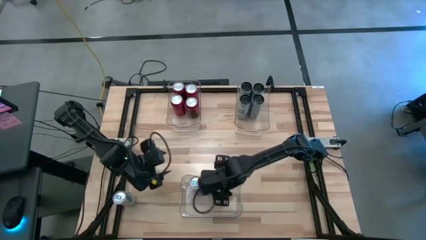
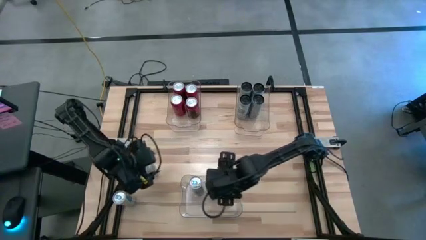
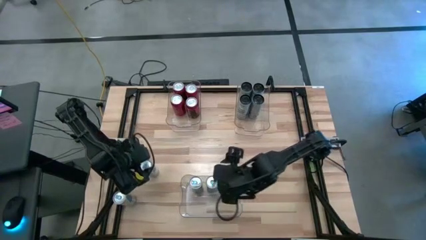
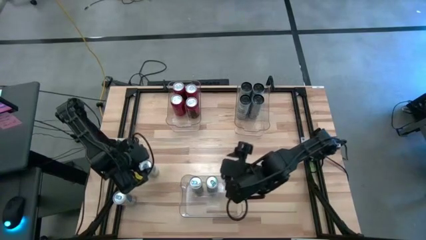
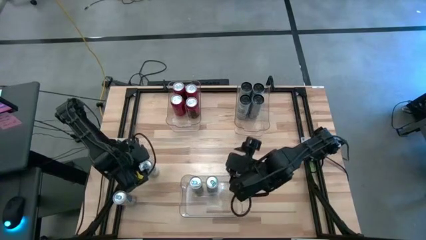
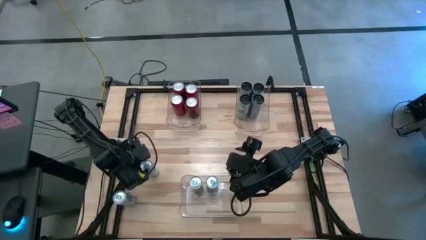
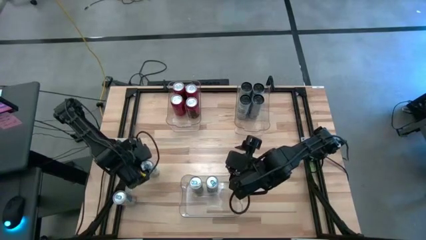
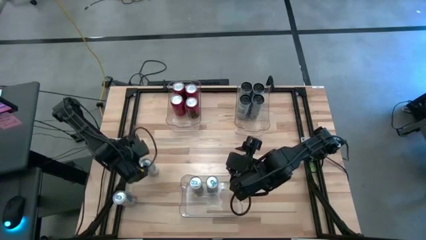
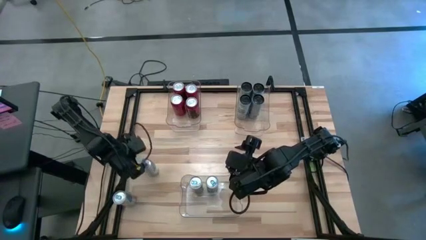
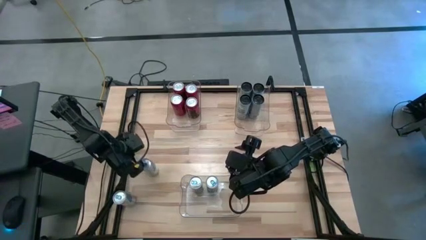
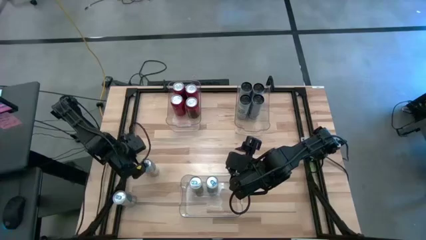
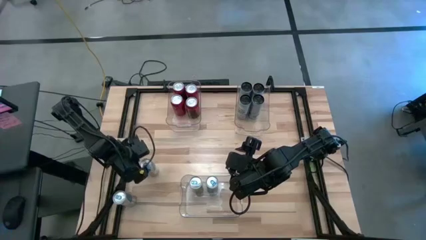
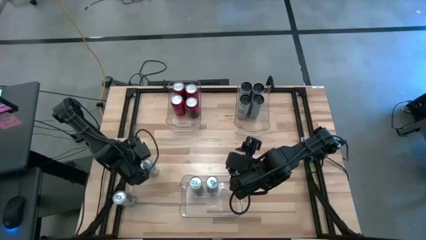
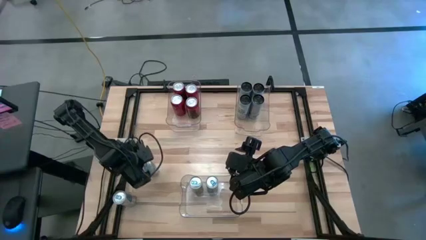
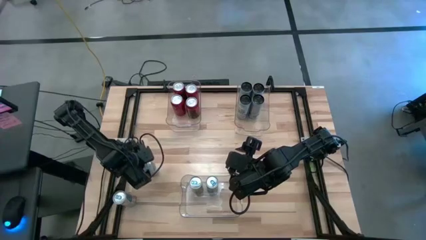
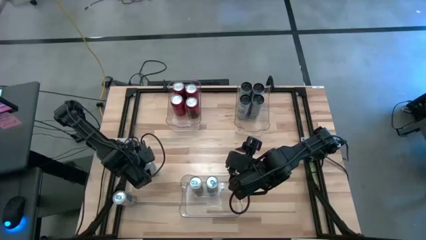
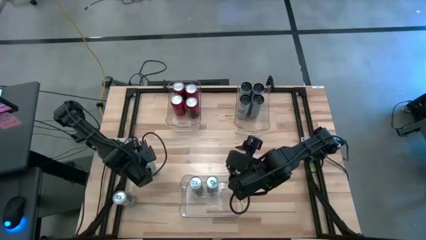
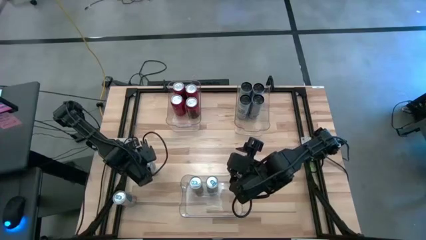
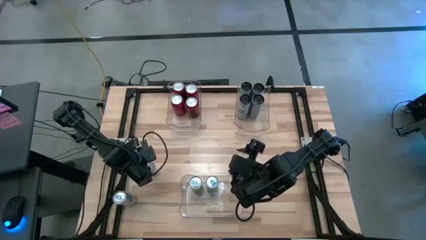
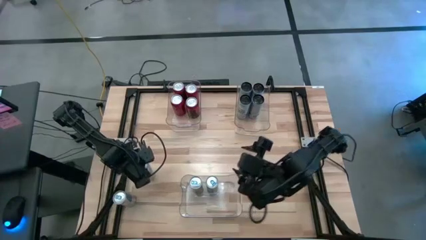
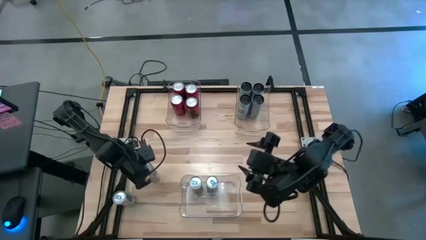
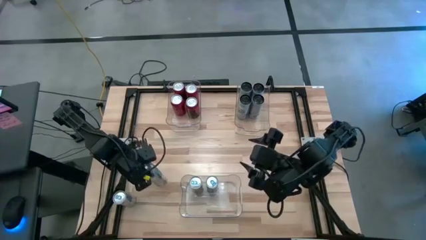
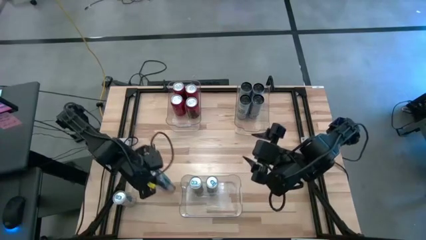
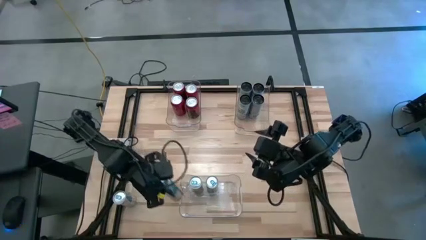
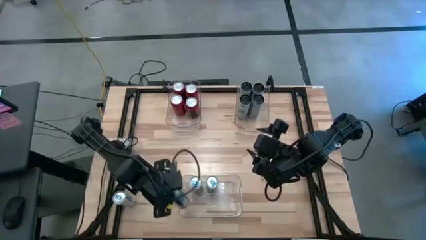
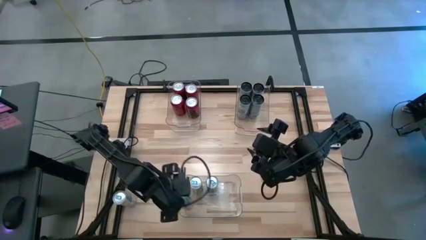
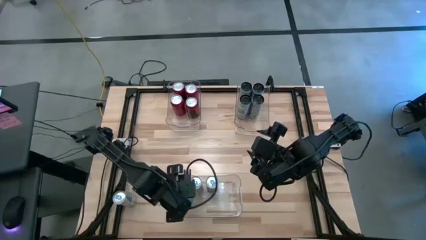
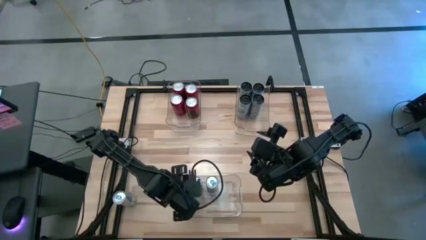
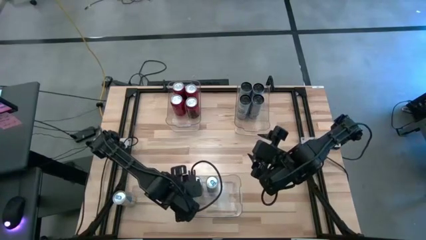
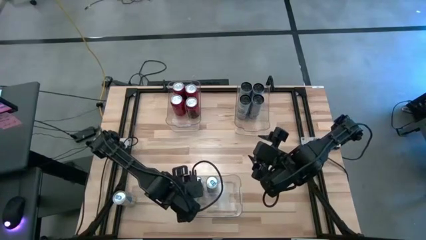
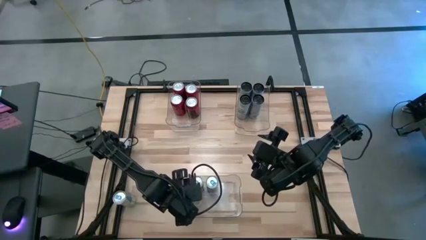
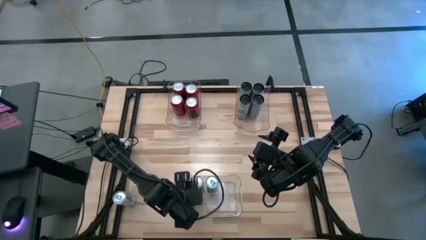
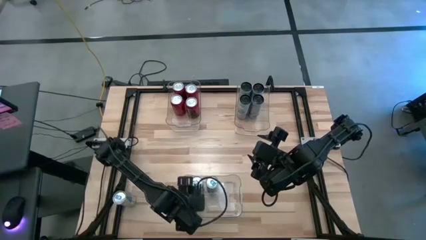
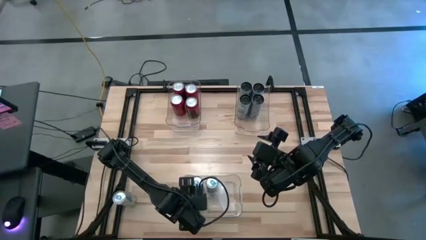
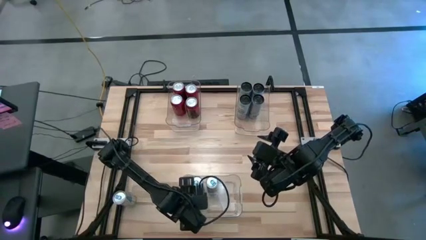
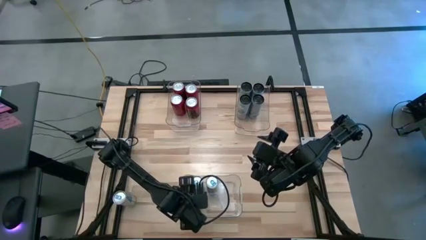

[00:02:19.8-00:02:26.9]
Task: Sort soda cans
Put the top blue soda can into the bottom transparent bin

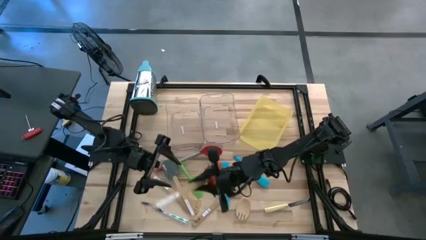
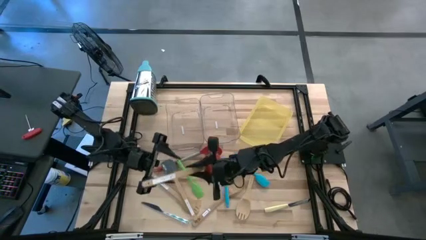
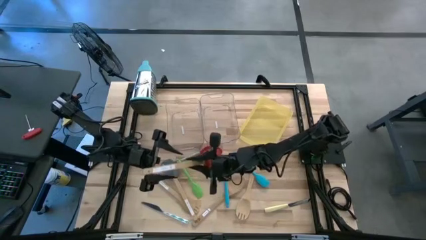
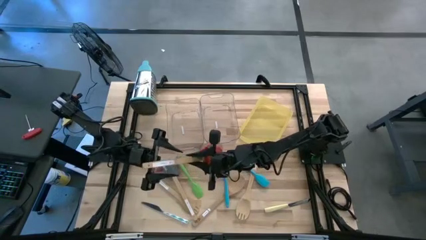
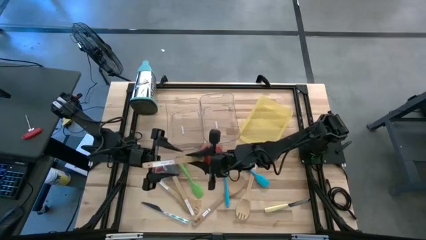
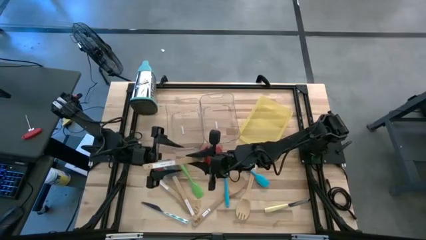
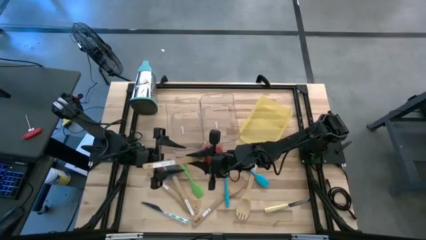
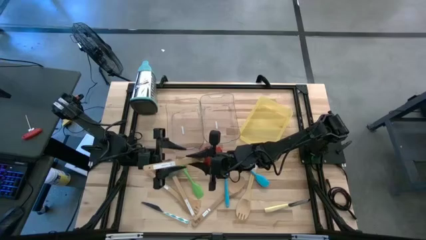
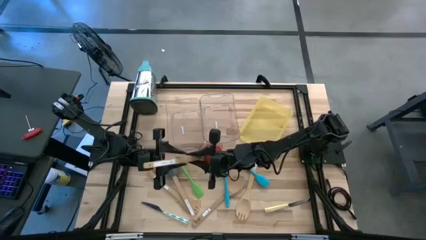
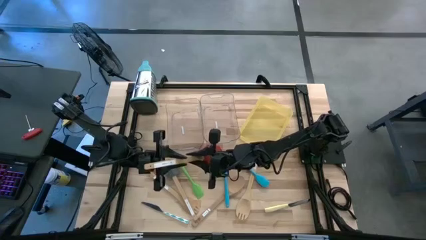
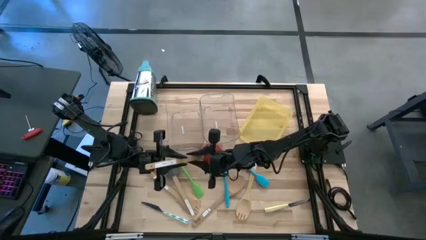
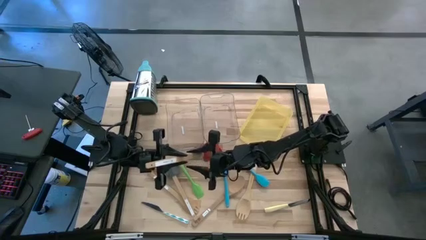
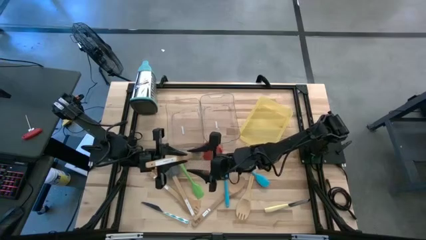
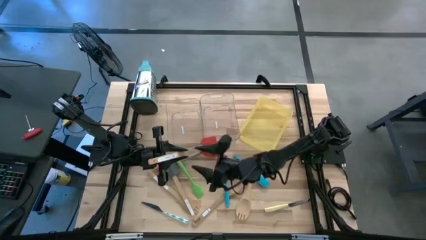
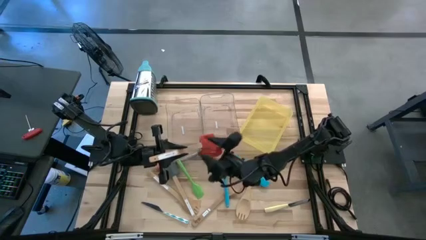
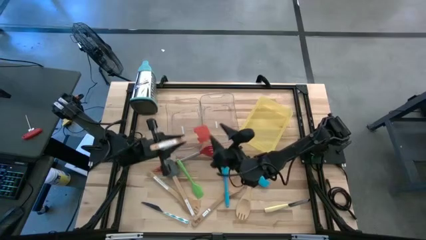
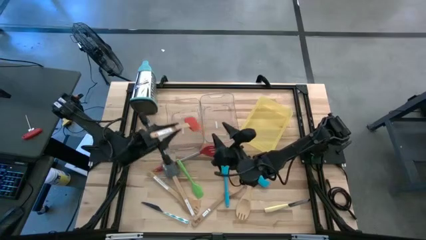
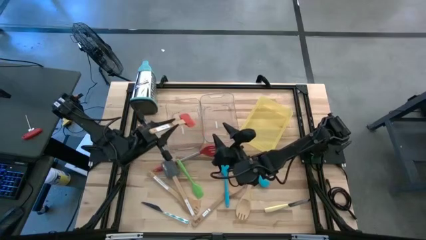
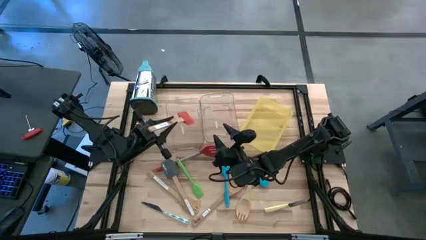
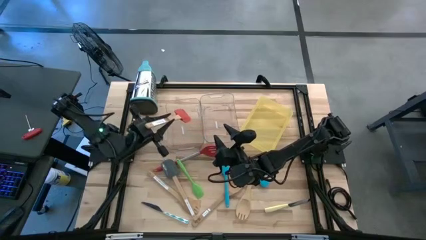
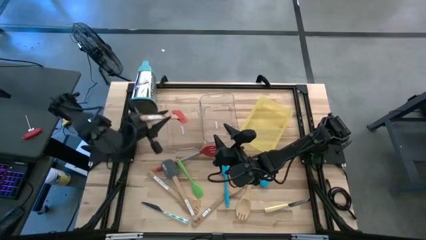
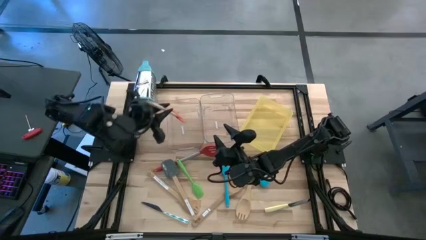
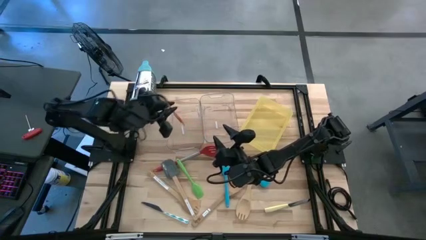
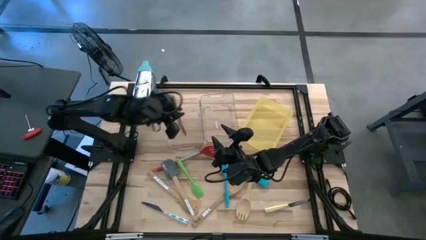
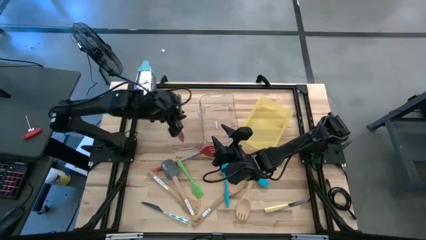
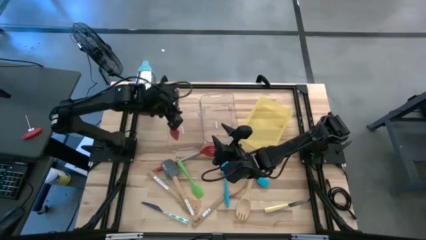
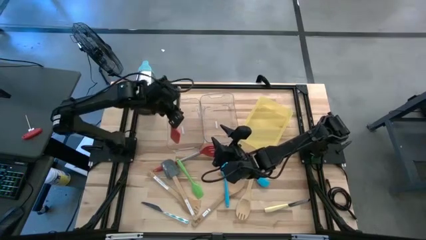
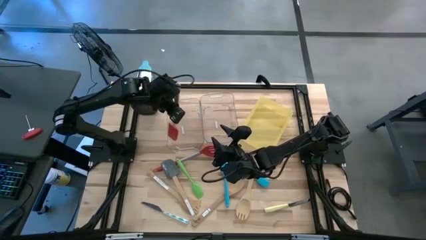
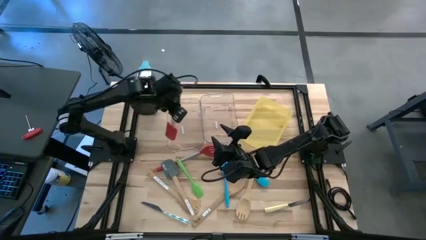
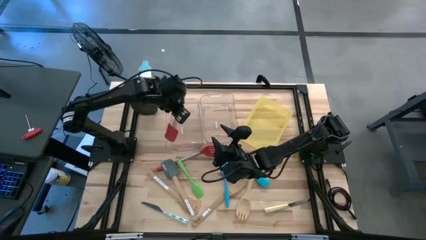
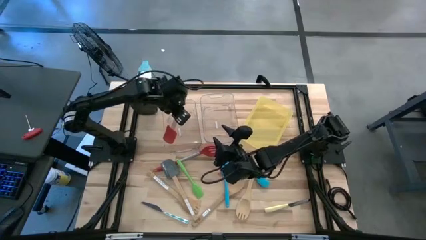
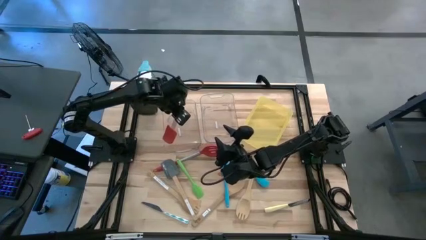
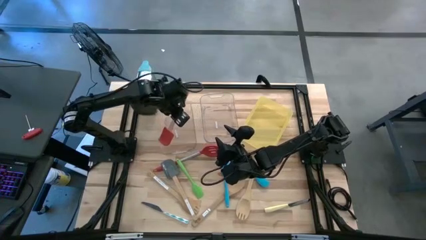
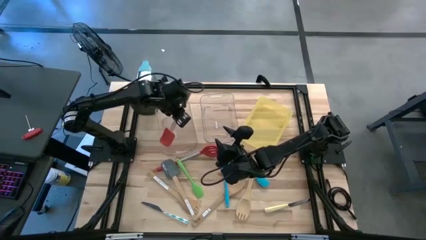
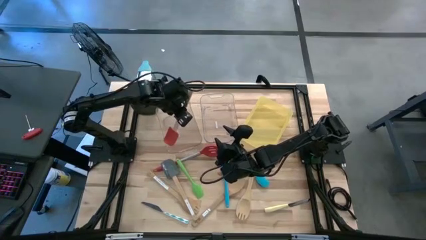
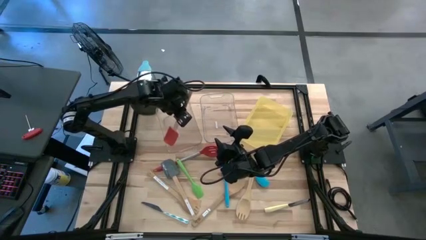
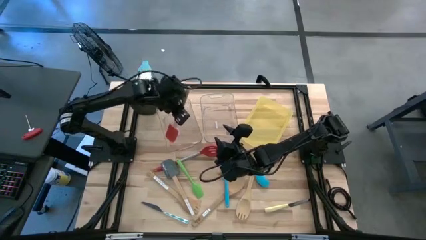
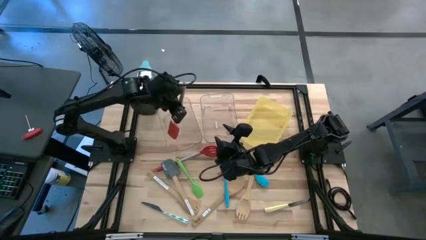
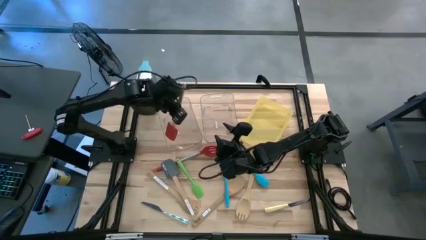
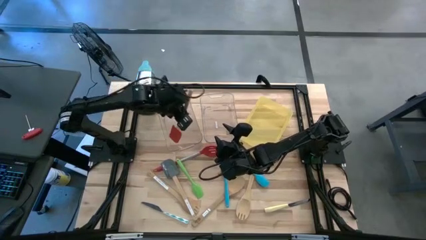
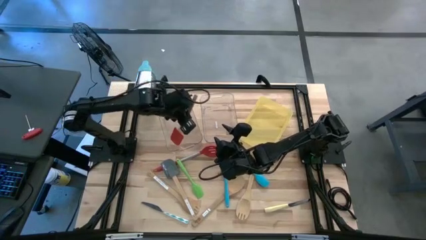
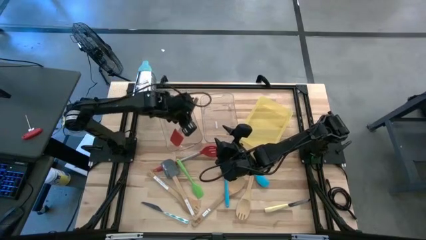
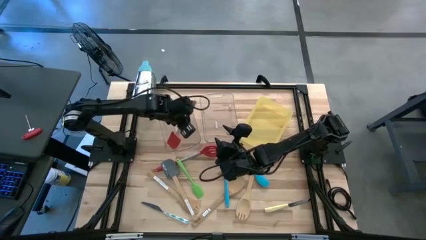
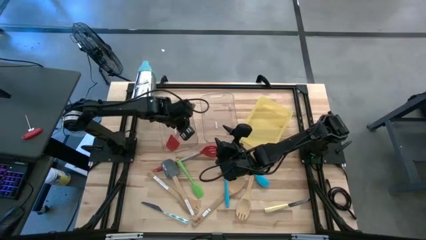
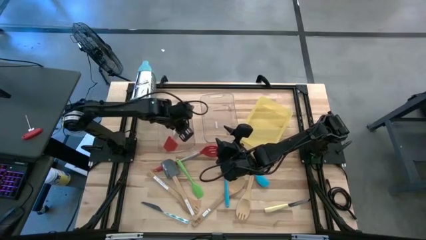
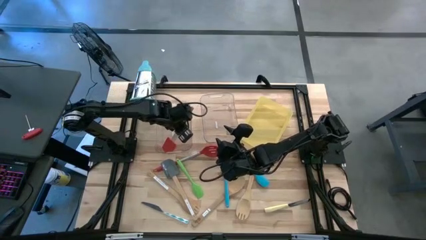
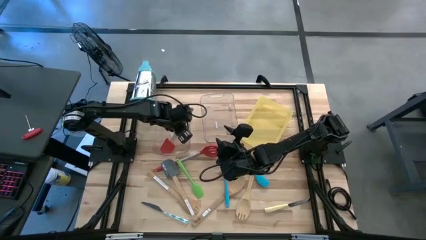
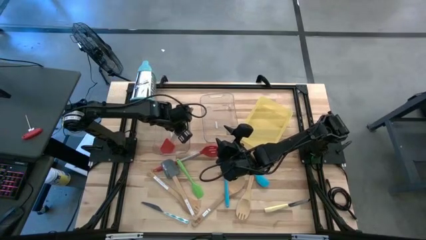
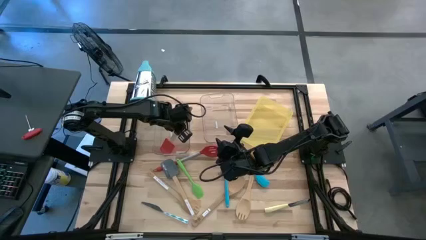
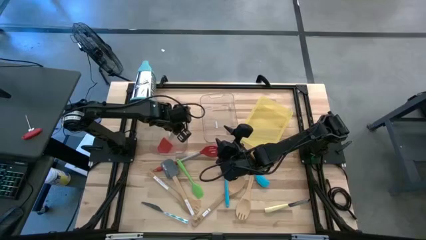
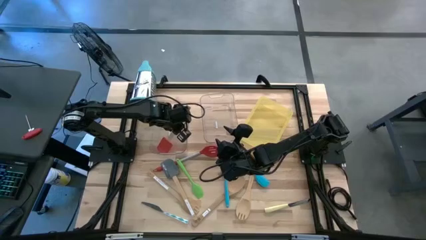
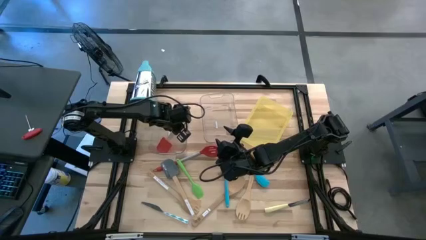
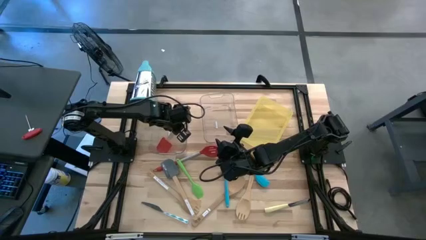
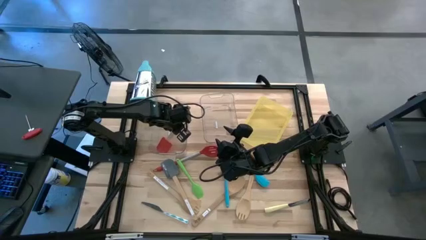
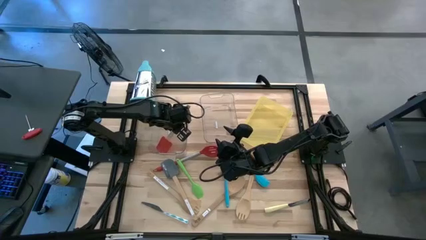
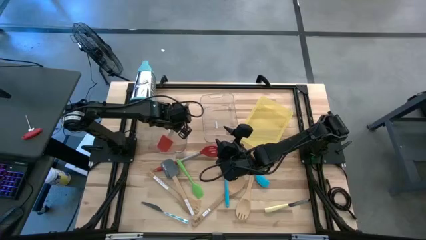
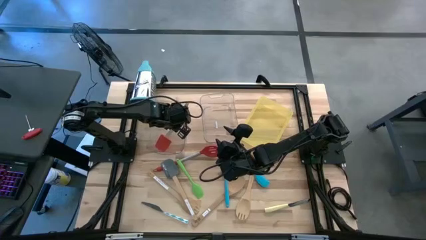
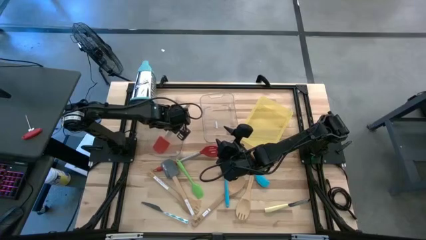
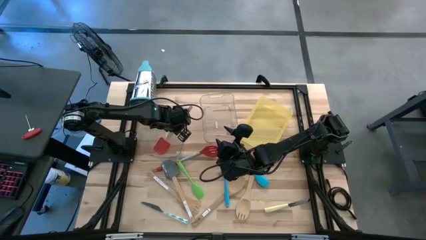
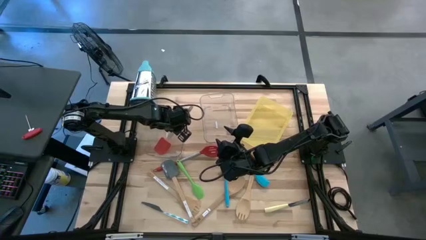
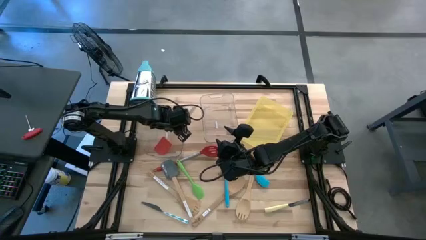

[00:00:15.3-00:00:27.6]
Task: Pick & Place Kitchen Items
Put the orange spatula into the left transparent bin
